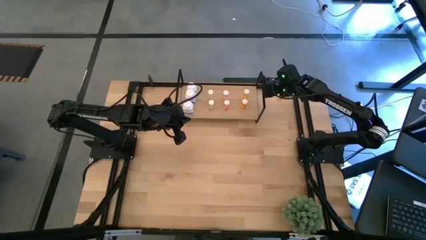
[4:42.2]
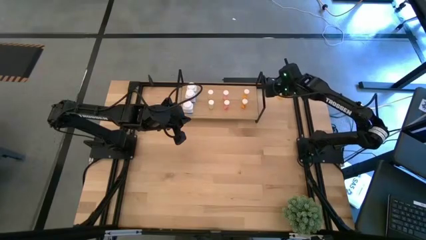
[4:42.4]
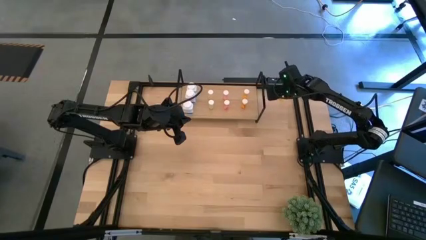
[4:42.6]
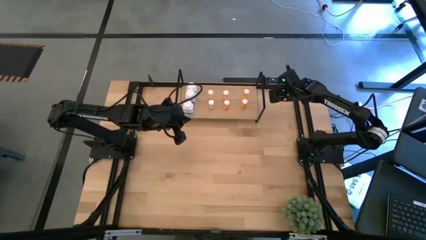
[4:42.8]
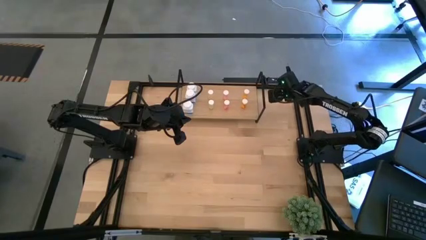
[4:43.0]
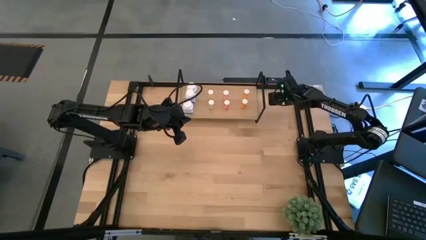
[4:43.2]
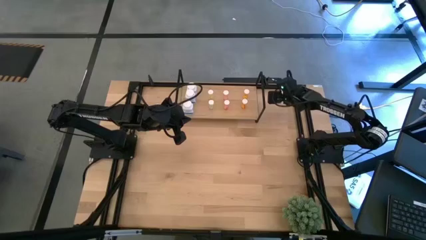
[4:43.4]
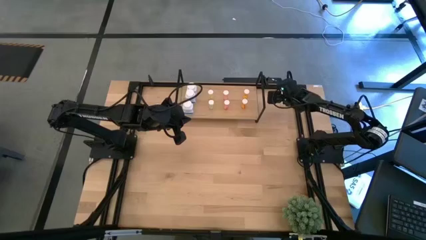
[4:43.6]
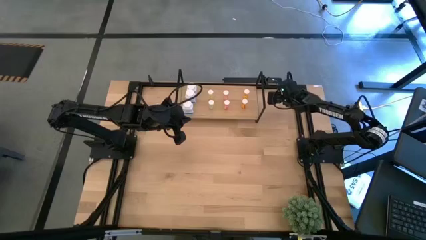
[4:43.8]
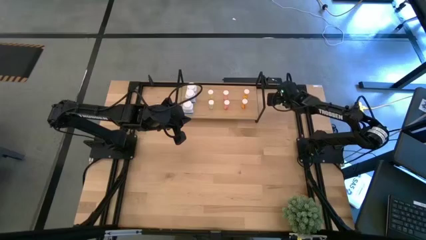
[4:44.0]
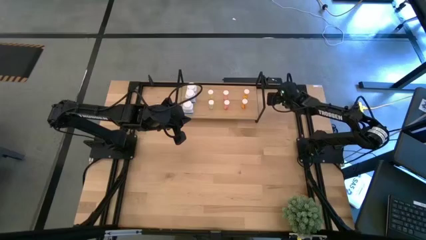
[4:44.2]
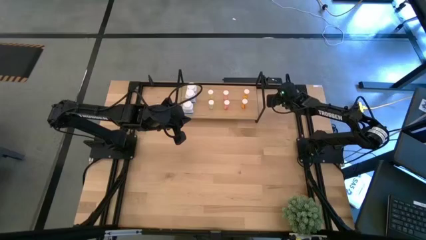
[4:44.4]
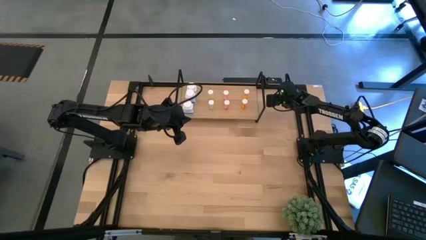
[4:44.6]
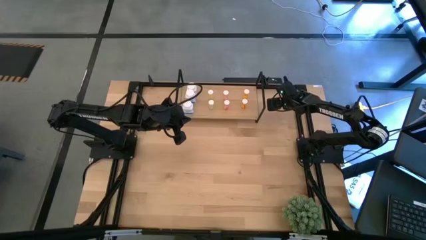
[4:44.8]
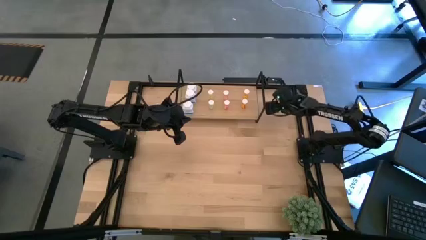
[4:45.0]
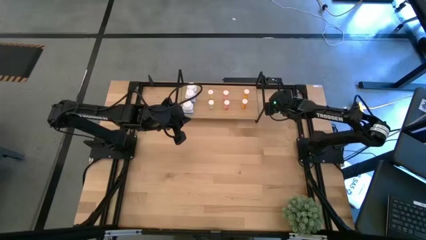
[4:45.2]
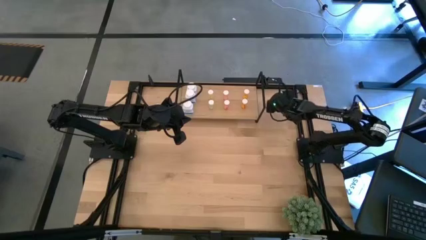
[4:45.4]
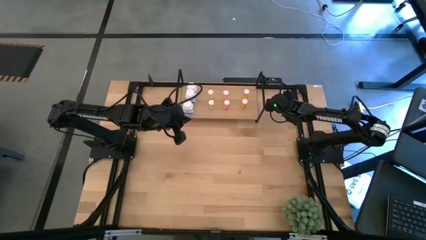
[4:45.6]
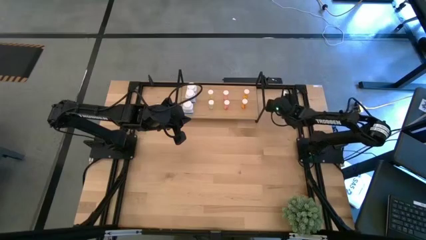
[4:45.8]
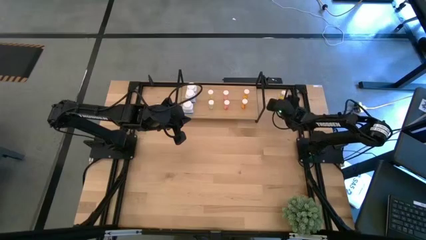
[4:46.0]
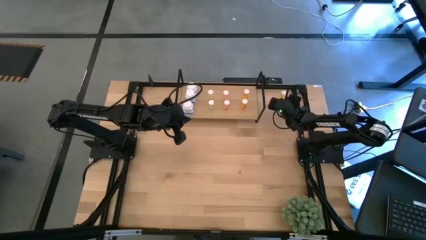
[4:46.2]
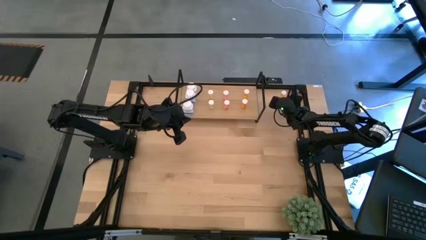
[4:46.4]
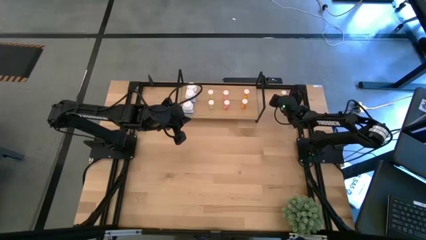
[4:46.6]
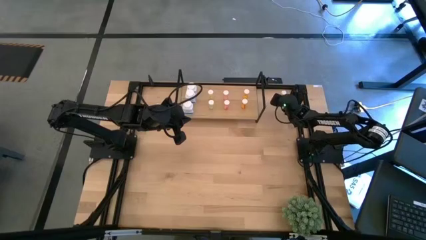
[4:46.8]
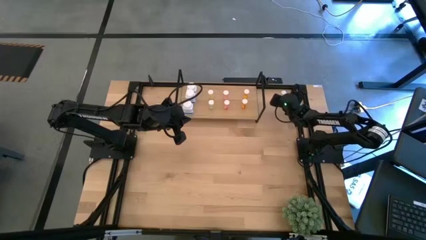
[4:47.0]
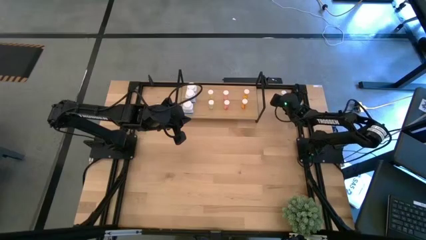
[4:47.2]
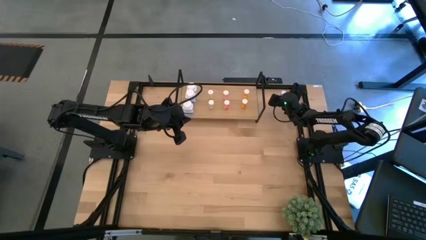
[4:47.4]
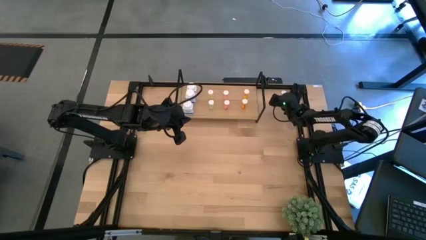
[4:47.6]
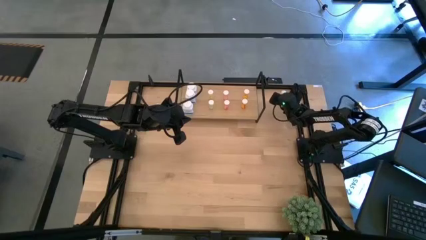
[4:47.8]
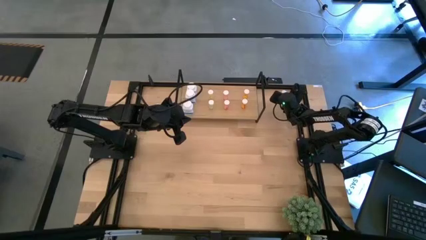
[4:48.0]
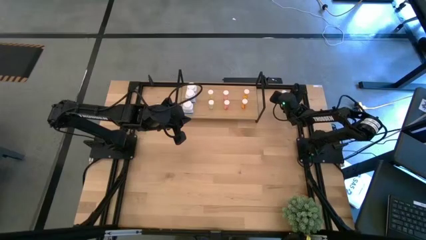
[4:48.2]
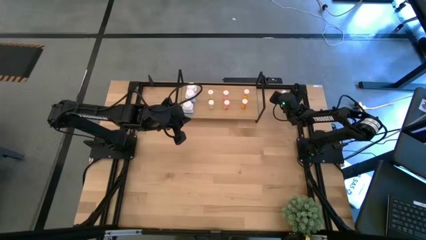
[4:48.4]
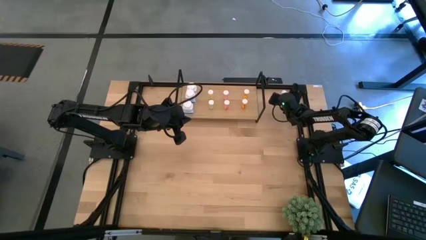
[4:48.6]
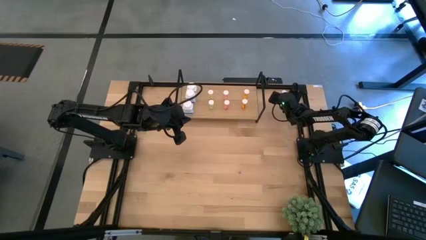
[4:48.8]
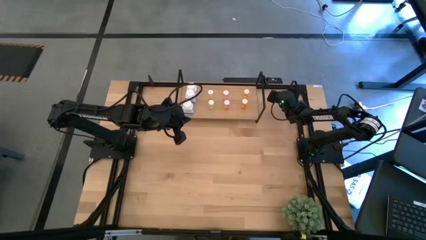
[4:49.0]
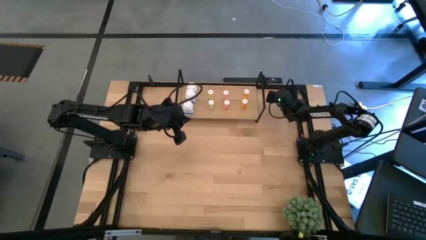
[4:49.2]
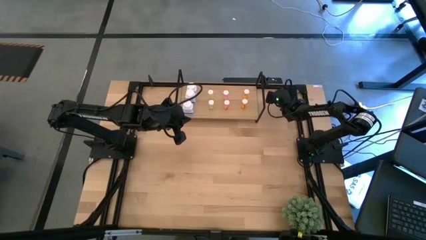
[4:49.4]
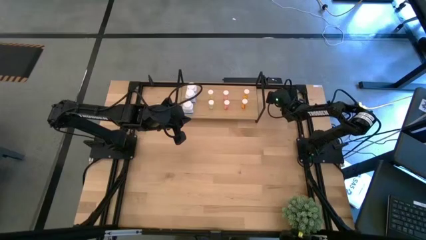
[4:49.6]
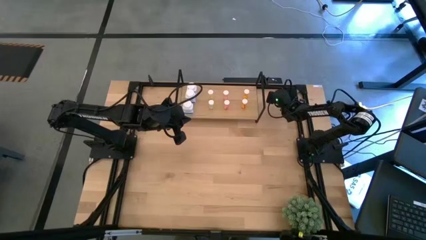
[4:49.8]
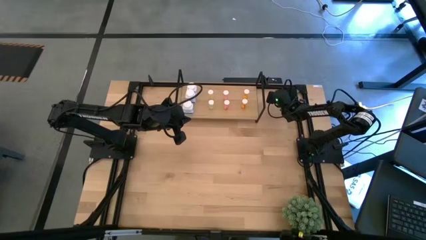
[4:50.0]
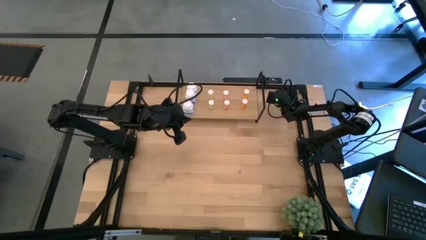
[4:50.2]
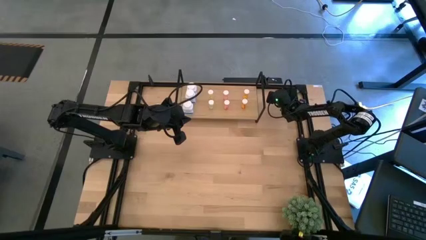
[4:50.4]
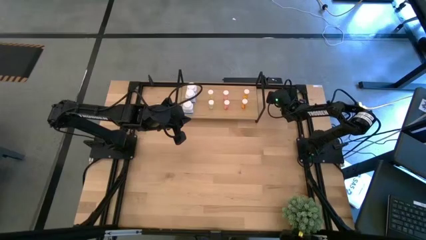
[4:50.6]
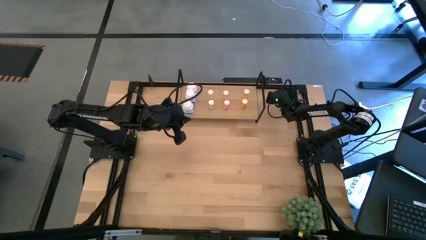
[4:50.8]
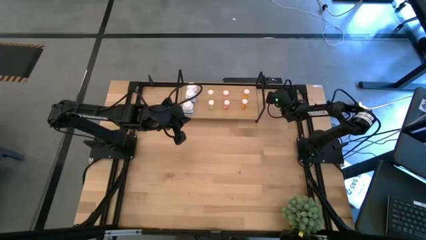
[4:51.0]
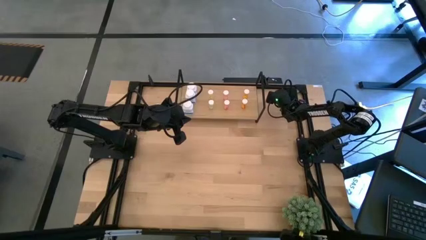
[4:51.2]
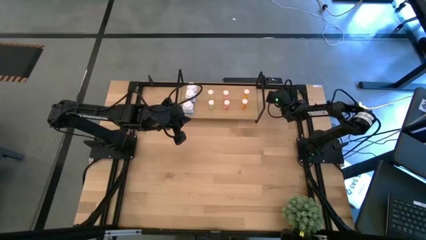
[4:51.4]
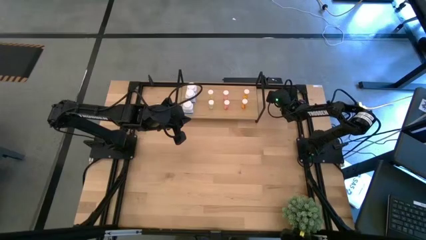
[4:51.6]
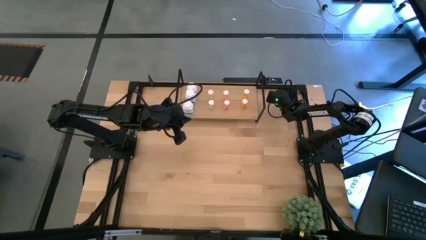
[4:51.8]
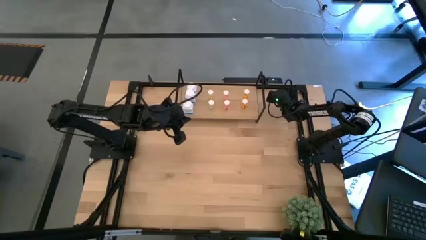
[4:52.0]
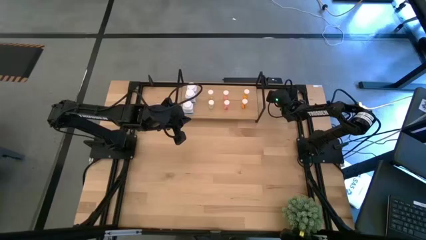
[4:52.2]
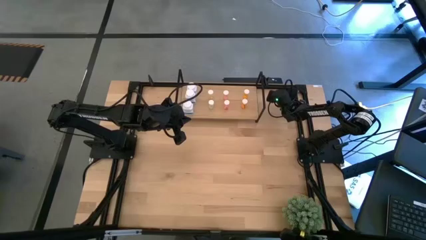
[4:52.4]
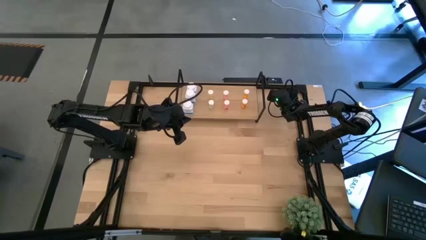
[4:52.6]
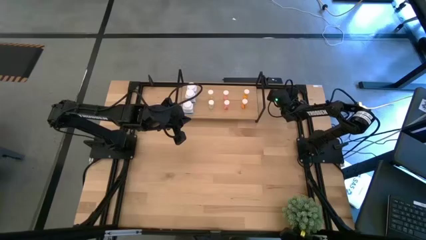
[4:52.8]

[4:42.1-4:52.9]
Task: Pick and place medicine bottles onto shelf by color
Put the orange pill bottle on the shelf aligned with the other orange pill bottles
